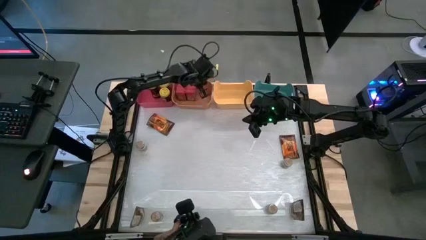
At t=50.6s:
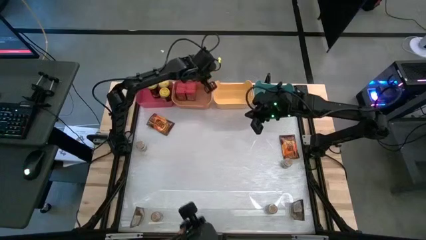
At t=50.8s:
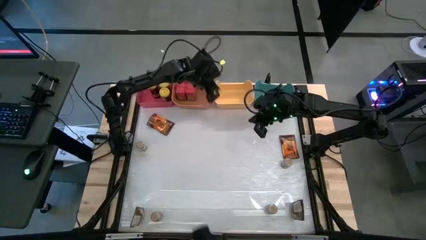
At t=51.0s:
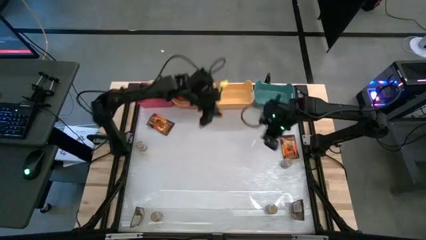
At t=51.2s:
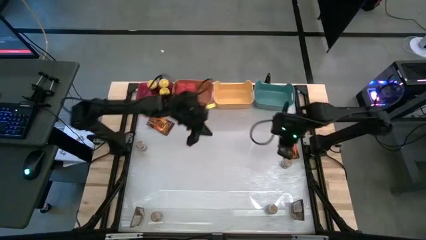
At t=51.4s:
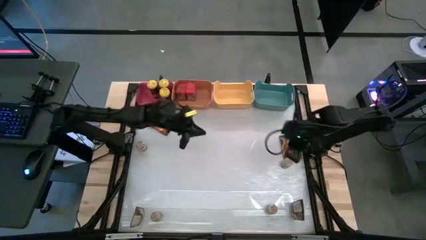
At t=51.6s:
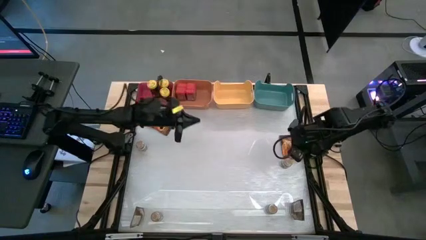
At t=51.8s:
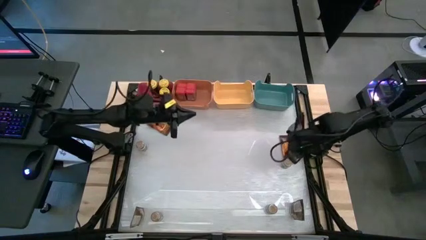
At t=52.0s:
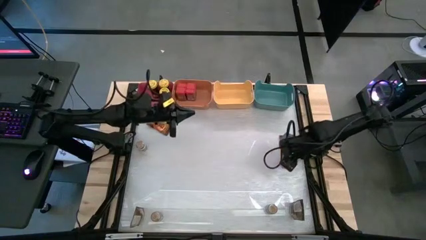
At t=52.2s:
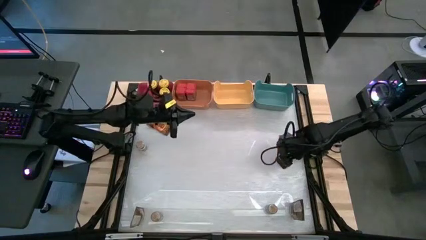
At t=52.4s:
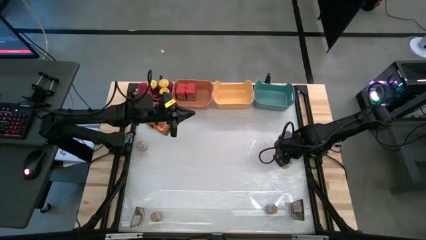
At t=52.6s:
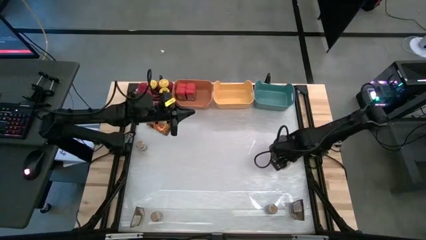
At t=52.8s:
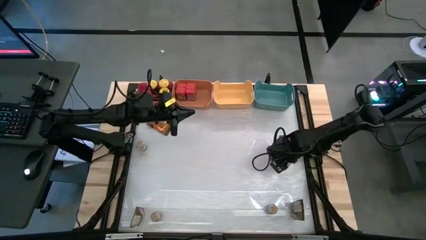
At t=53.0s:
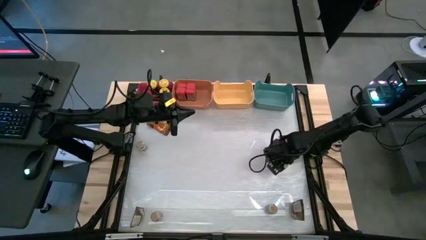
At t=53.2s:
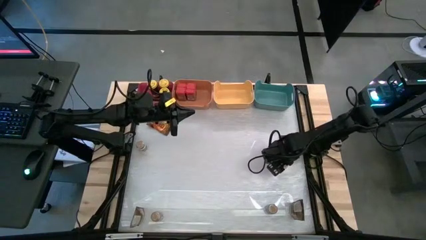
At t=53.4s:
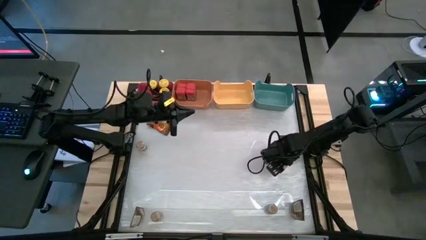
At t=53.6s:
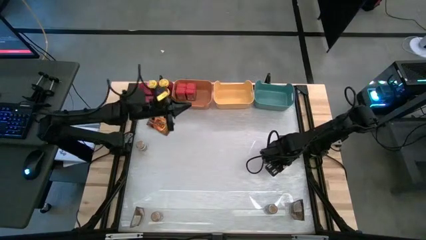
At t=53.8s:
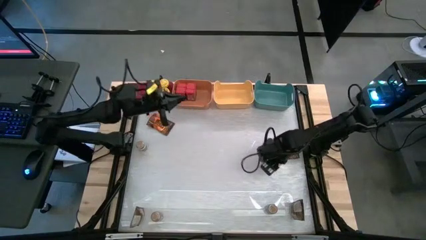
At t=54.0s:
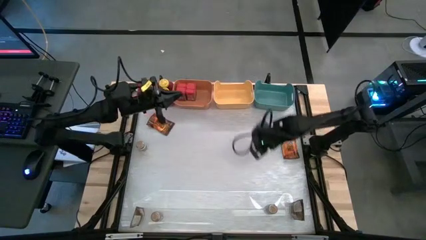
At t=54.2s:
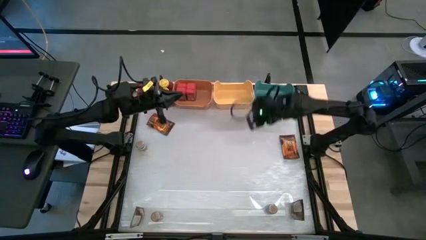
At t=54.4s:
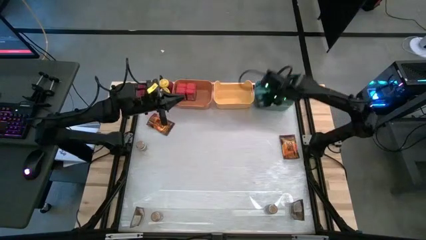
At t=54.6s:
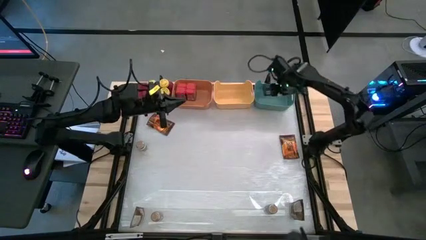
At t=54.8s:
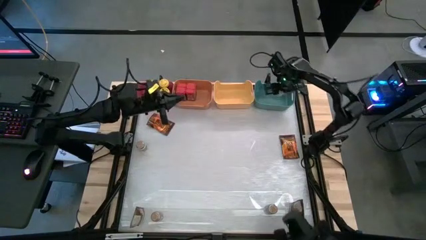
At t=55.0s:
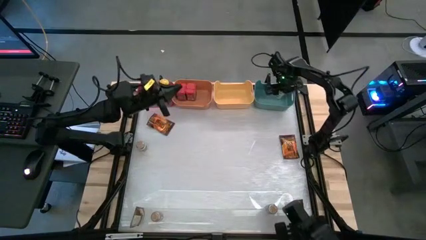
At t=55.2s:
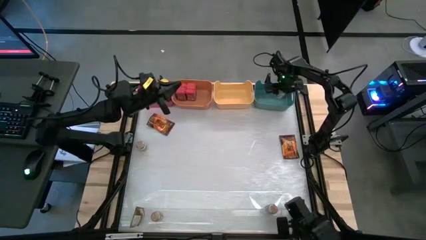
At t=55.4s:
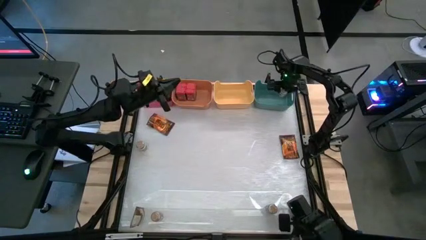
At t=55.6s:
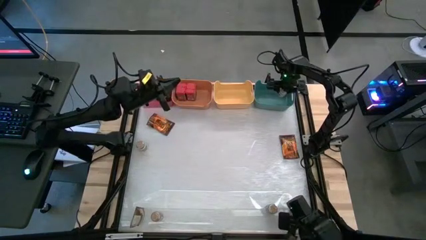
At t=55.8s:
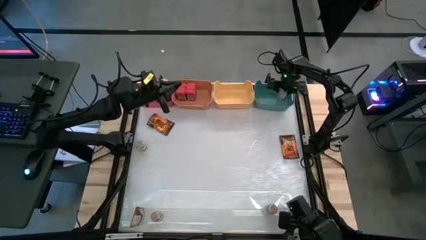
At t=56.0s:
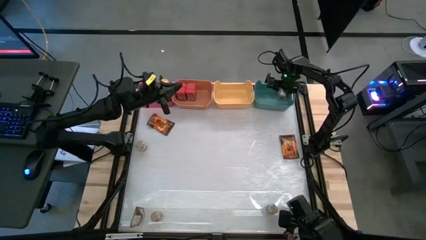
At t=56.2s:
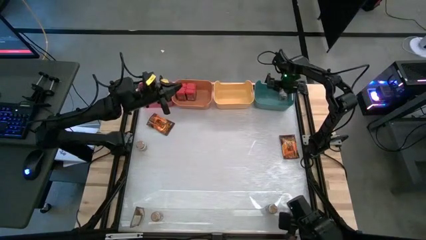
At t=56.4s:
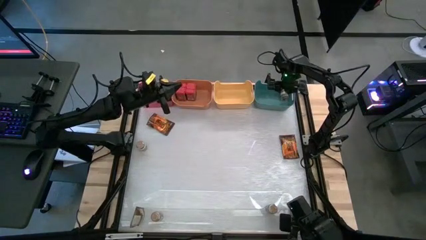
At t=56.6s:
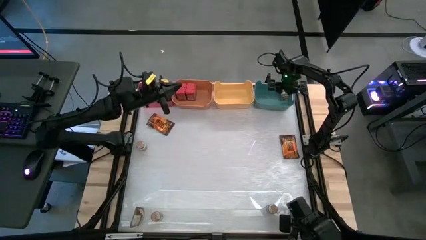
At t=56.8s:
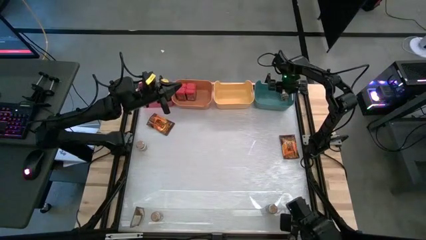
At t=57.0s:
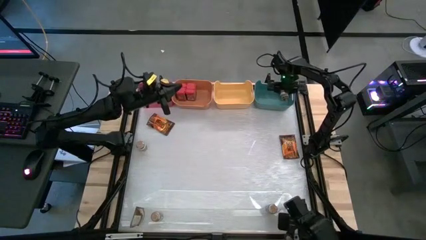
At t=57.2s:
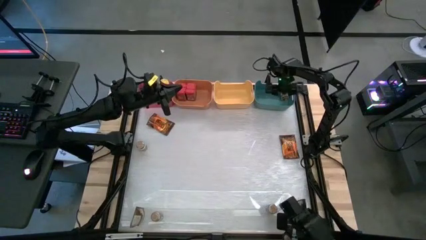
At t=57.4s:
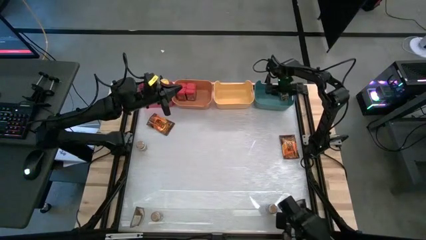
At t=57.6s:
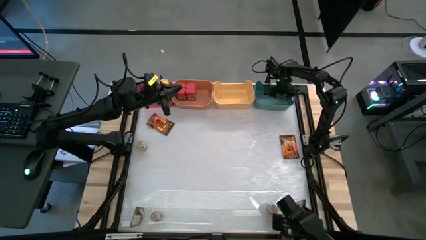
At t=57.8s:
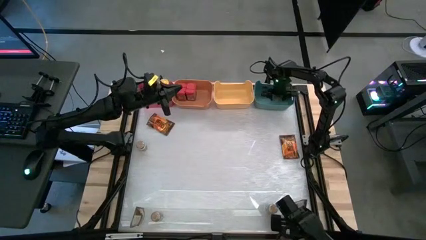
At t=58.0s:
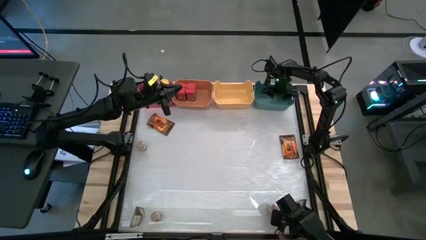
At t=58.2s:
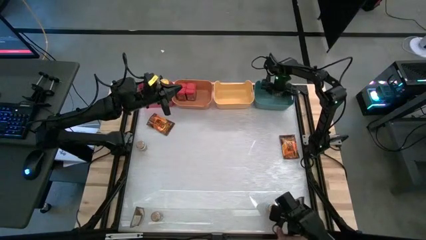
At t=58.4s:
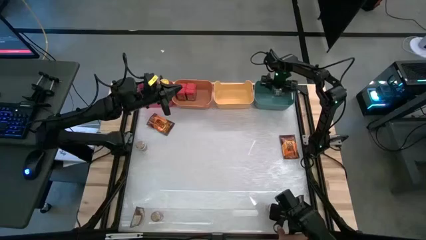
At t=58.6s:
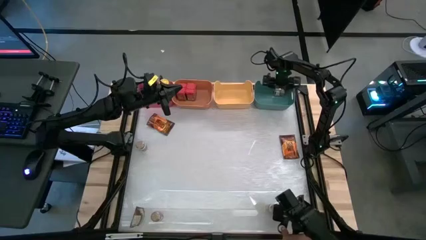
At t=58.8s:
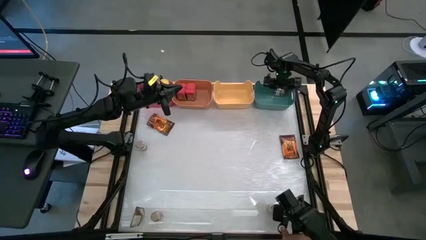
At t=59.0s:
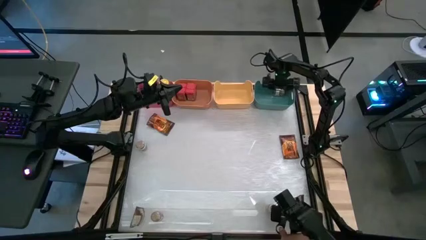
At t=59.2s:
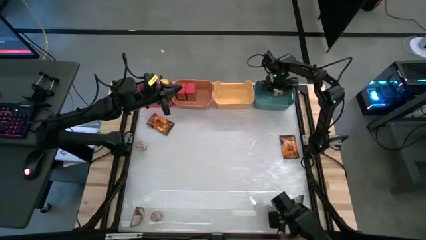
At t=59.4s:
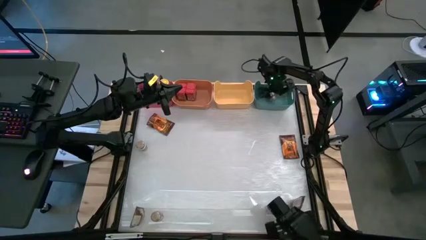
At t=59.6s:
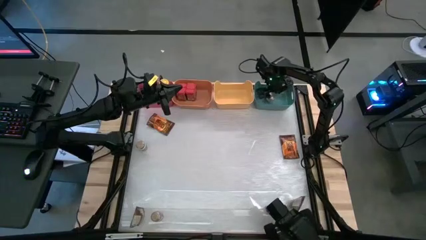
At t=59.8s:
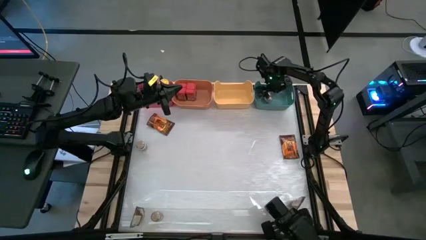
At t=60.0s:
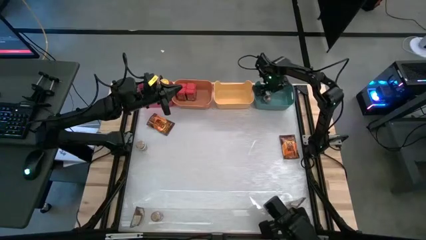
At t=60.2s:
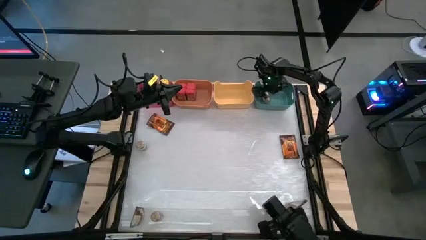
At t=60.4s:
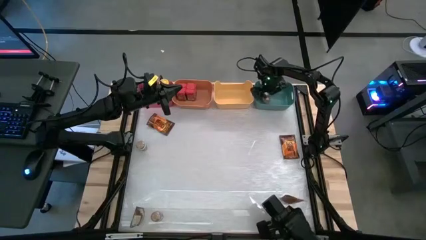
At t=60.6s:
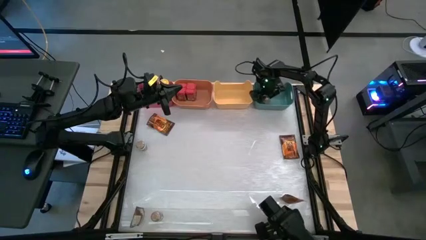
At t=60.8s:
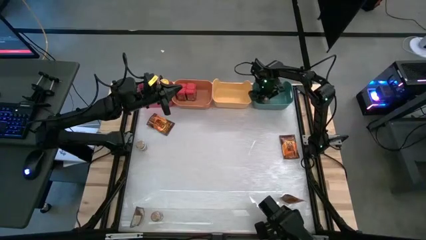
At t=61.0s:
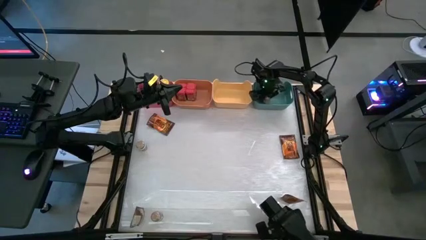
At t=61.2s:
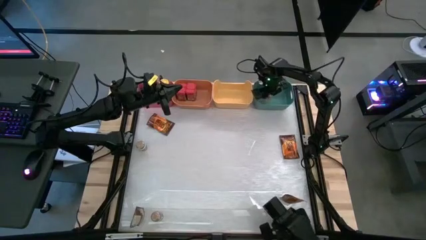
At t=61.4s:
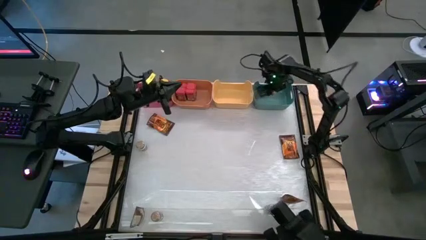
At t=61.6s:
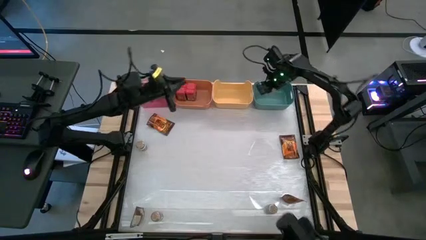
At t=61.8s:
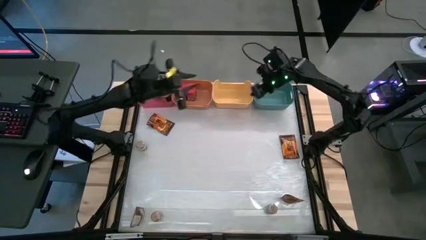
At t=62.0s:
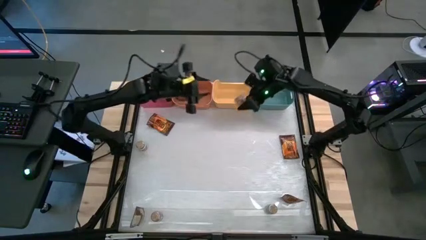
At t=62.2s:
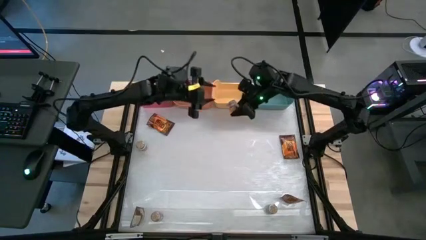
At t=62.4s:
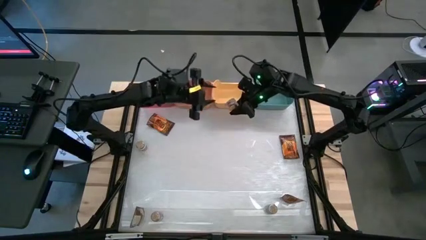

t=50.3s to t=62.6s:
Task: Sort spices by type
Put the top right brown seasoning bottle into the blue bin
